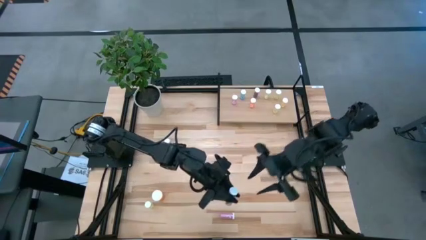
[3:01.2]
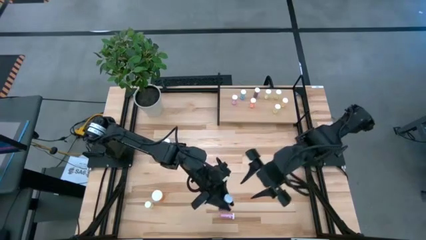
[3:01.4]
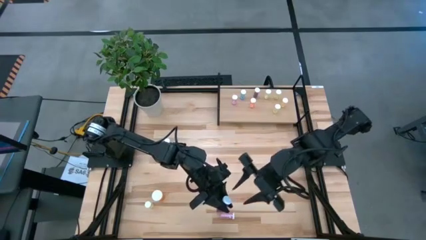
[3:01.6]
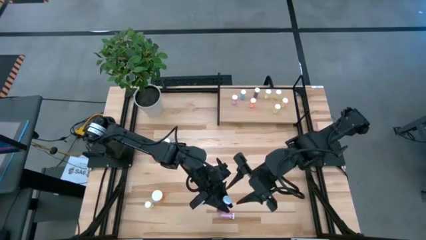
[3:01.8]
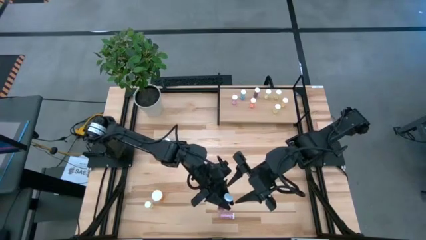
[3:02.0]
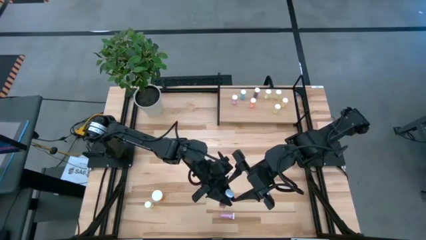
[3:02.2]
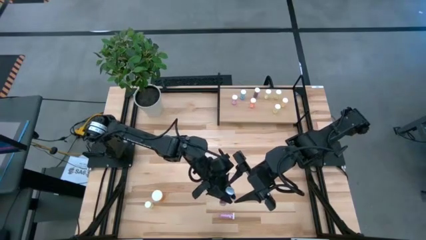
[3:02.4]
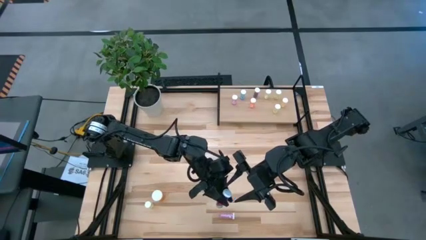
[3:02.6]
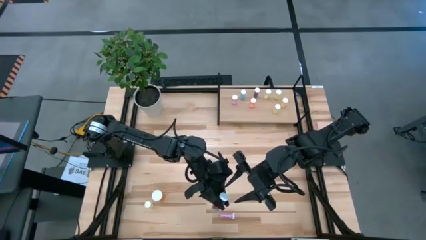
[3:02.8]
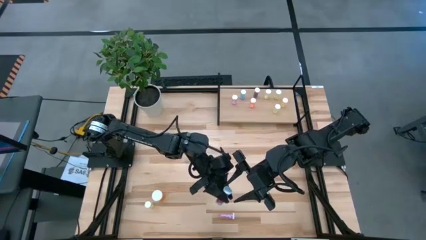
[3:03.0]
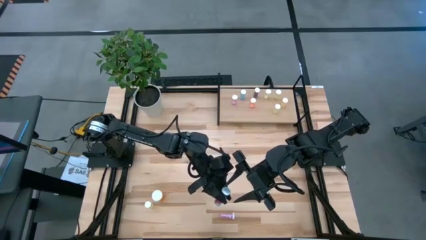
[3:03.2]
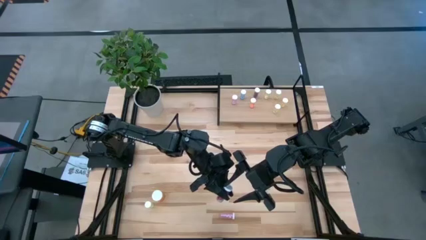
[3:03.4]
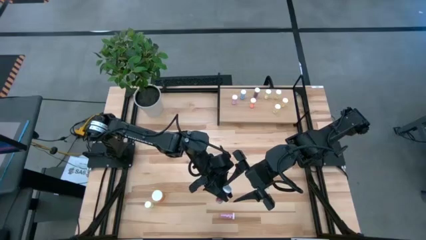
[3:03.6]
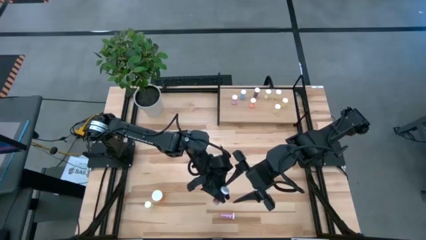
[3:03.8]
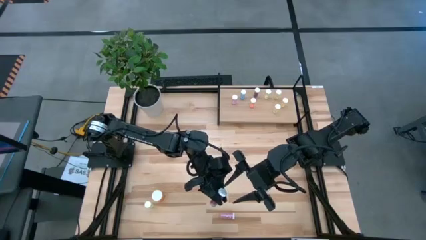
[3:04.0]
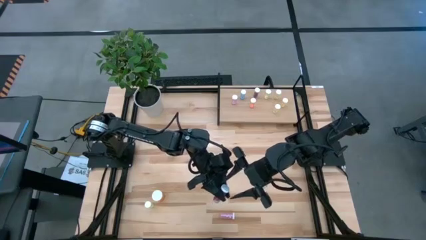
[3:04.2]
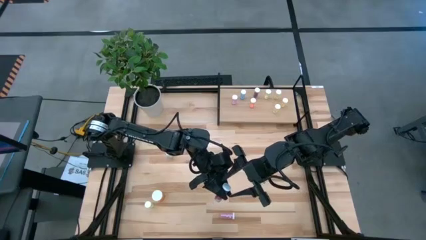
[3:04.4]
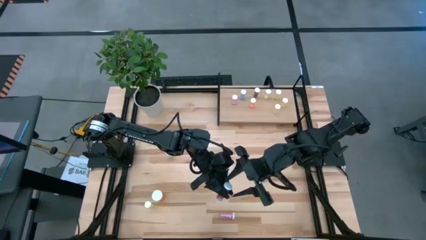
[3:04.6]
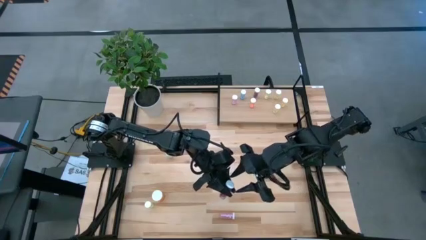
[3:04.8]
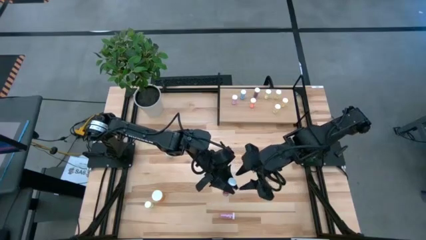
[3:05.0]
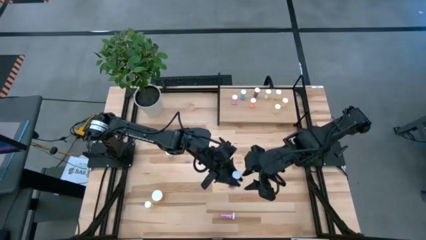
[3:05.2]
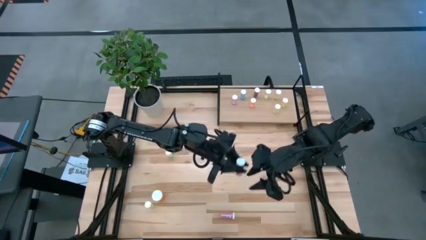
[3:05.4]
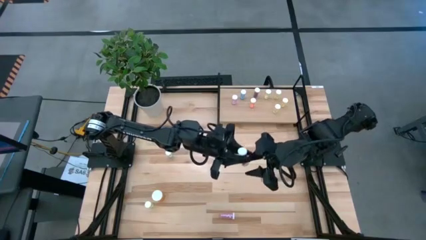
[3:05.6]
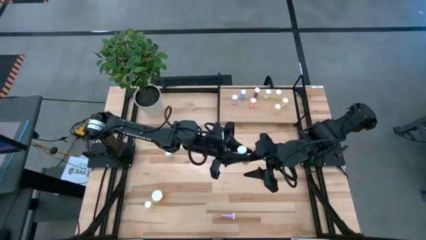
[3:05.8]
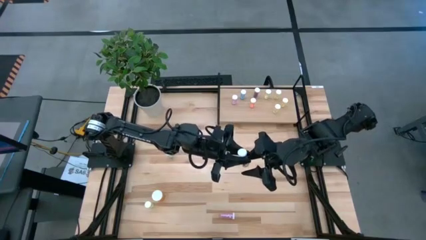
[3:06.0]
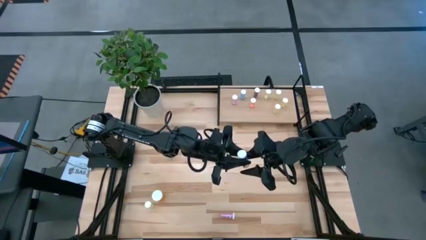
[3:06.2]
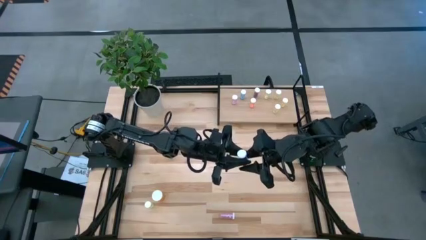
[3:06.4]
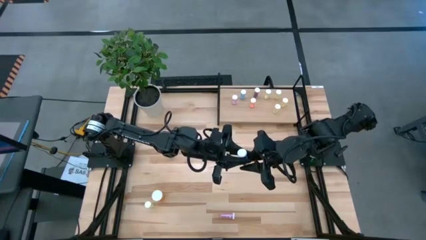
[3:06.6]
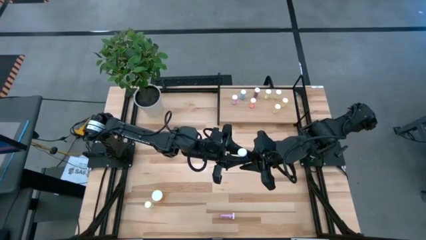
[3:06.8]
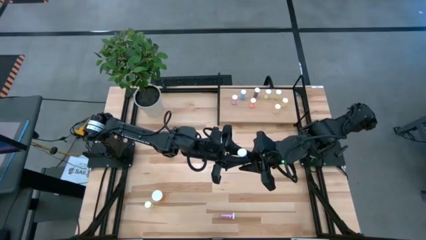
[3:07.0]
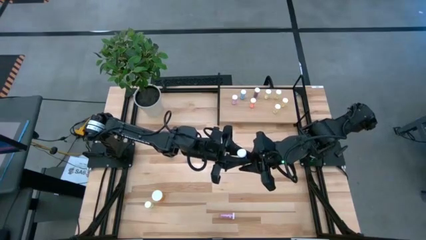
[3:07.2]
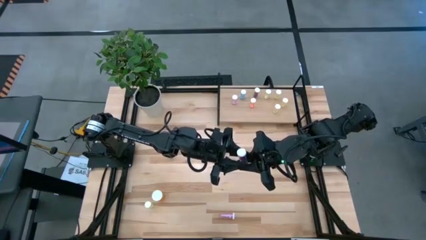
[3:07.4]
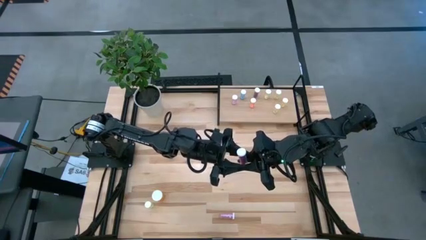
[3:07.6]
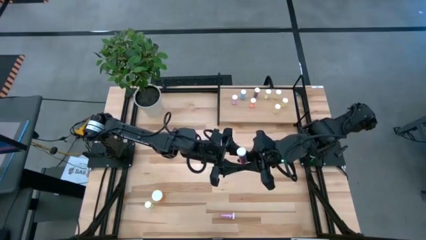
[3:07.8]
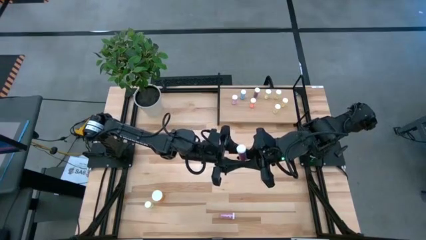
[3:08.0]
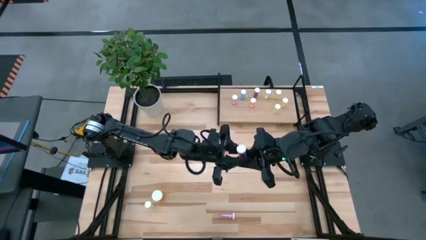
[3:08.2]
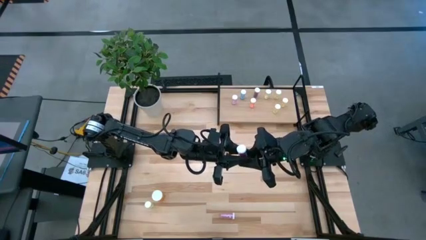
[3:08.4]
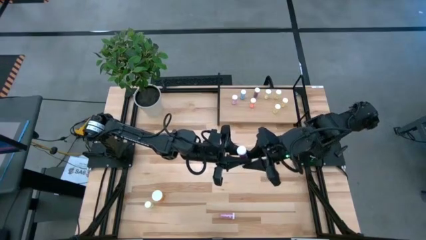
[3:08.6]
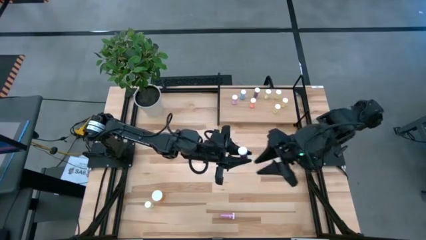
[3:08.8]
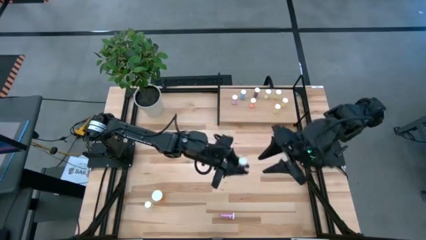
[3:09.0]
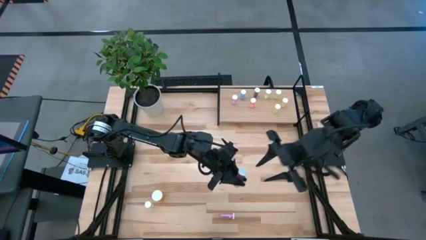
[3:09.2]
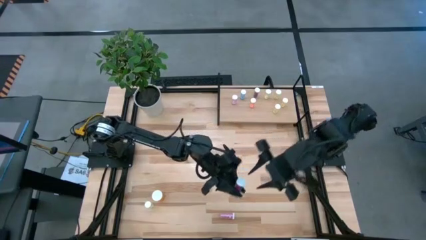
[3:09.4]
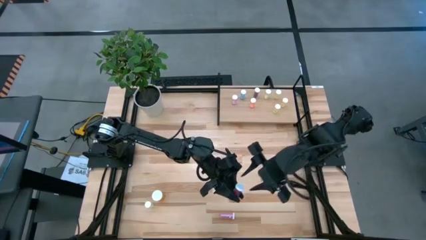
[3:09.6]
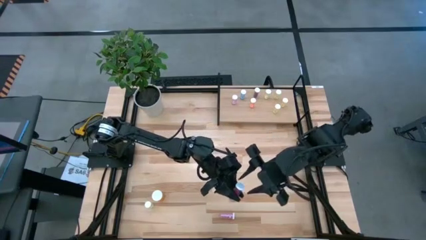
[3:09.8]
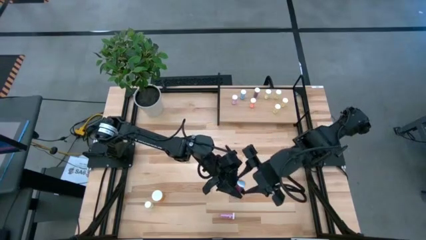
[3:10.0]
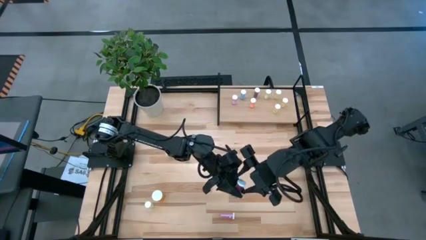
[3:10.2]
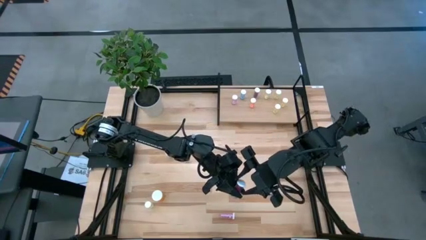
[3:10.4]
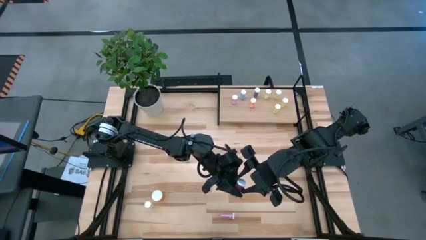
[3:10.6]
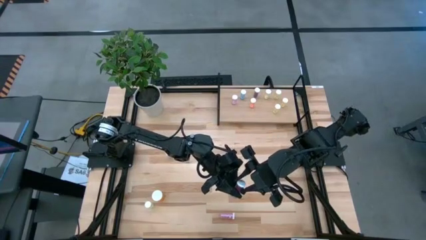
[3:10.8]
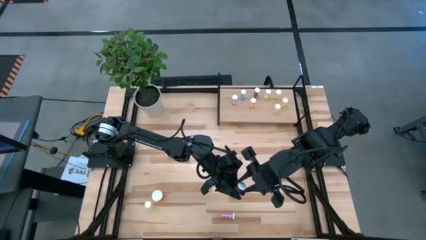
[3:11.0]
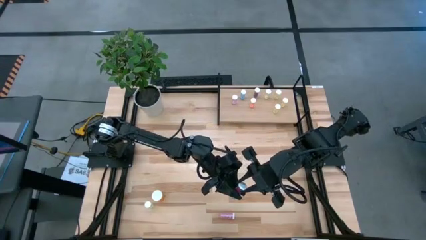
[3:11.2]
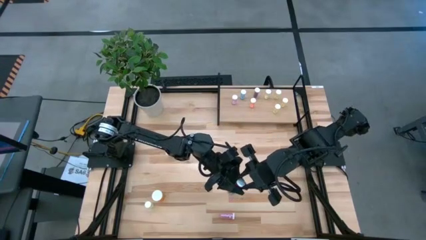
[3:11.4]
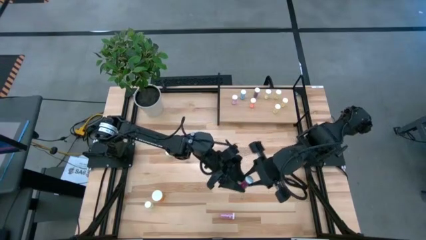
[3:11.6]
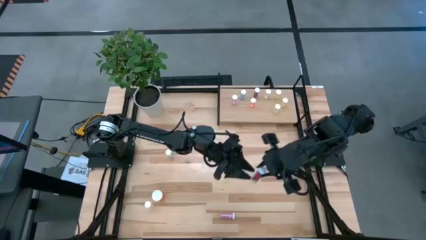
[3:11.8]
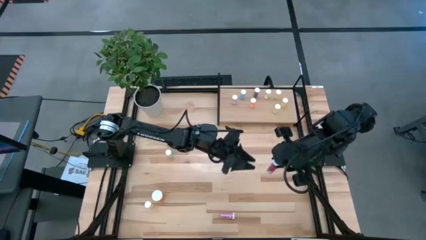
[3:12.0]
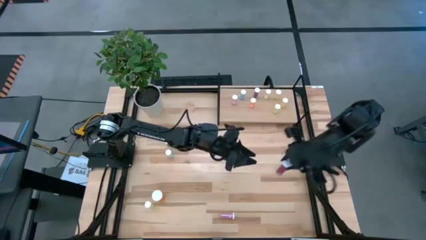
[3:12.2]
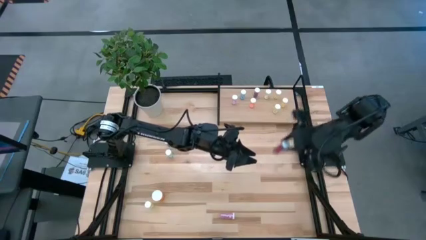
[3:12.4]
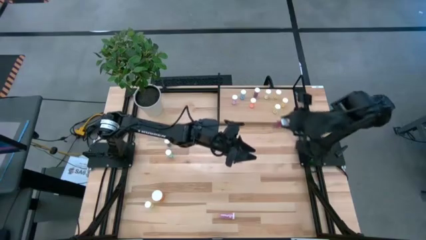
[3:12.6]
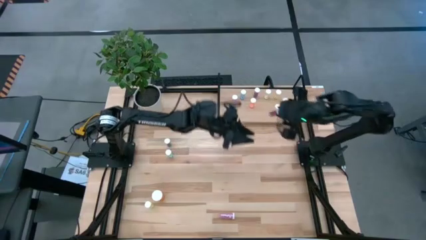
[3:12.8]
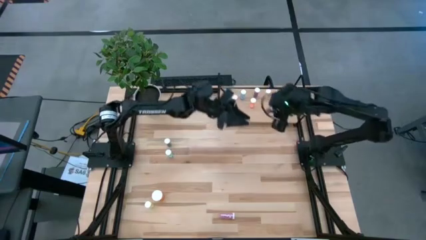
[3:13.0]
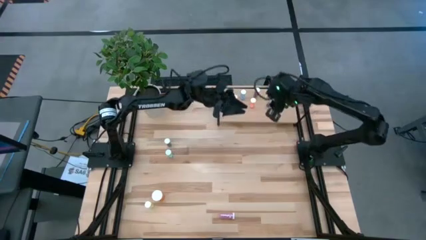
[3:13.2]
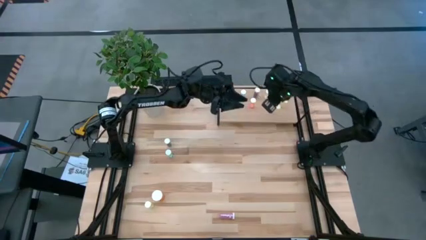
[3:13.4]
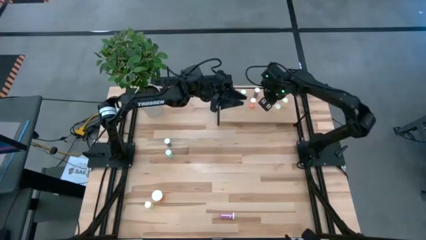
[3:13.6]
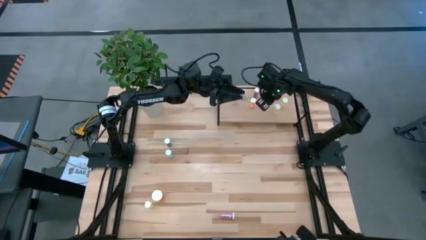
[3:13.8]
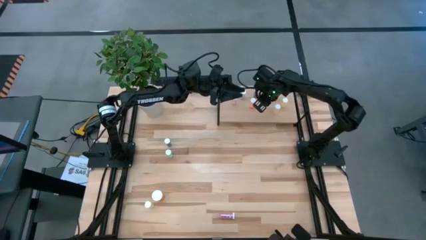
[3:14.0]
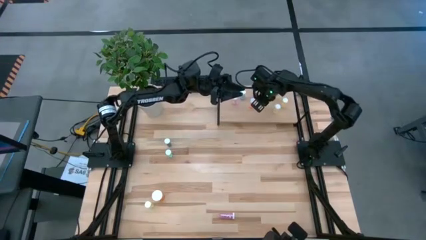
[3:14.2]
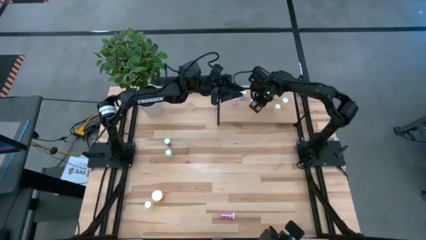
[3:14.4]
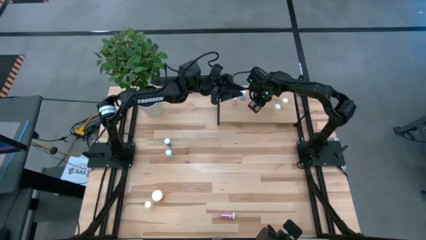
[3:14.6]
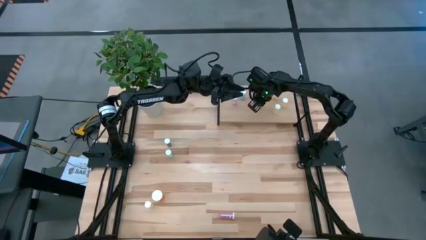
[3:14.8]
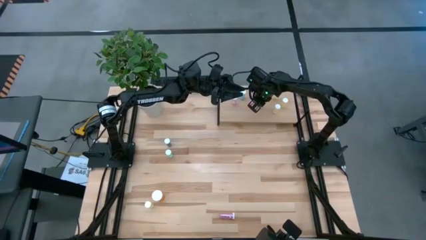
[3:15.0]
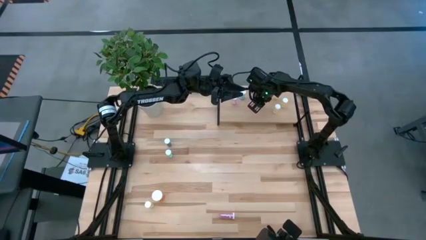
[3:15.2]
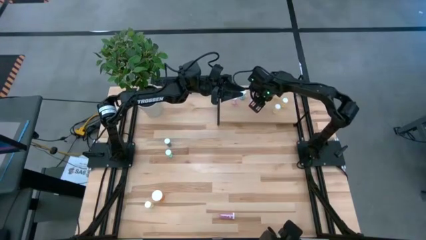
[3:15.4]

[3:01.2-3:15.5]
Task: Pick and place medicine bottles onto shelf by color
Put the blue pill bottle on the shelf
